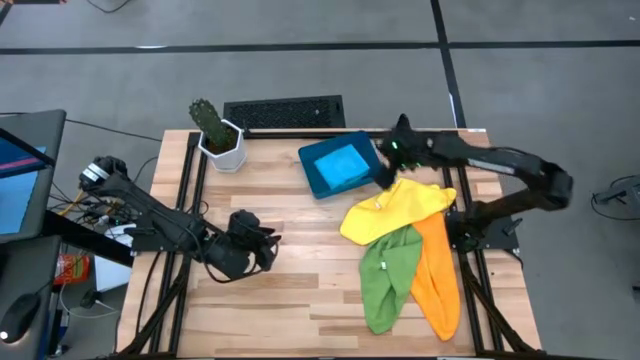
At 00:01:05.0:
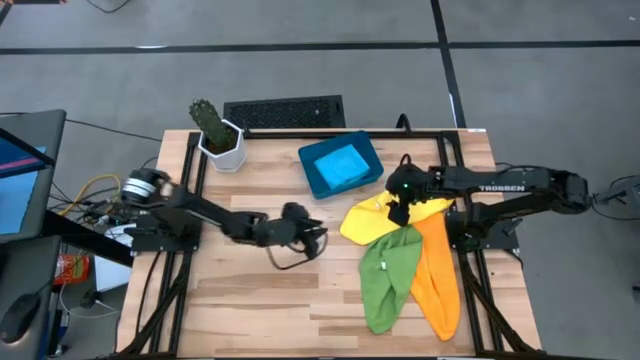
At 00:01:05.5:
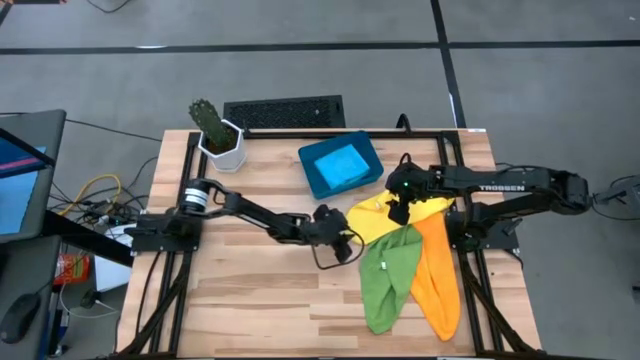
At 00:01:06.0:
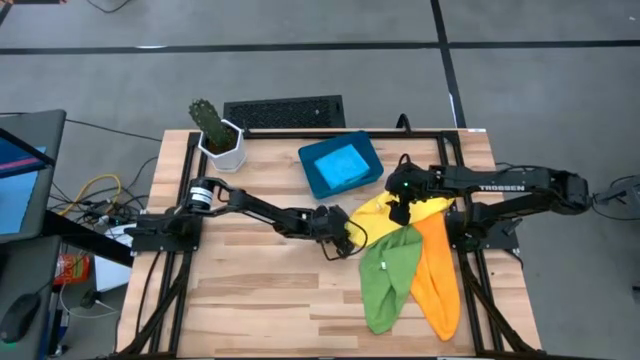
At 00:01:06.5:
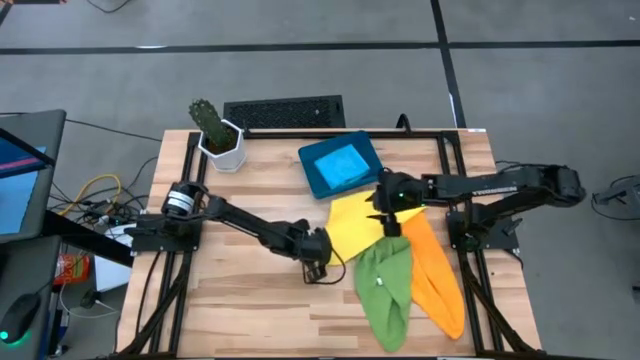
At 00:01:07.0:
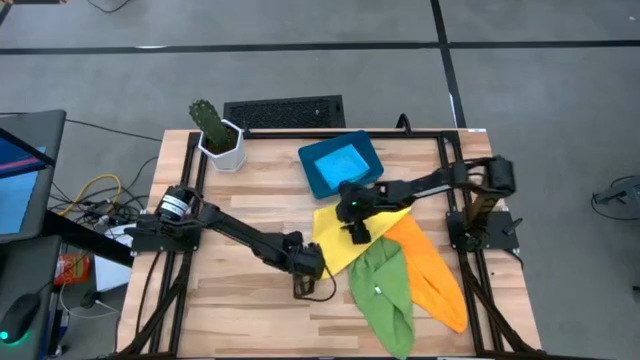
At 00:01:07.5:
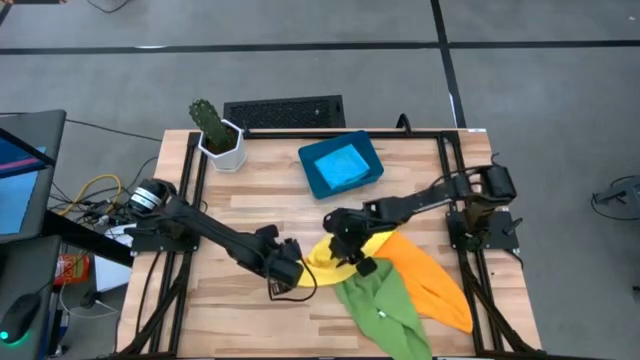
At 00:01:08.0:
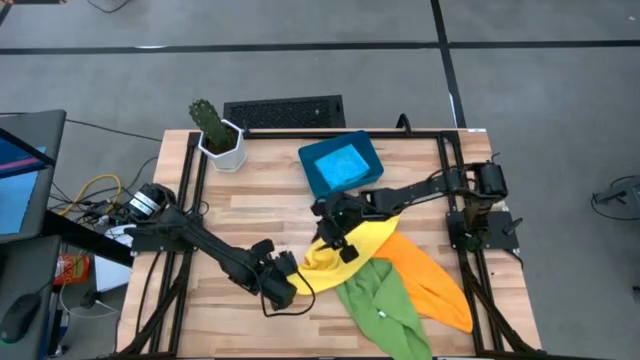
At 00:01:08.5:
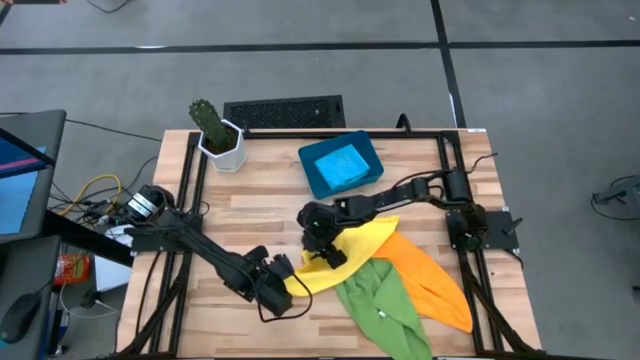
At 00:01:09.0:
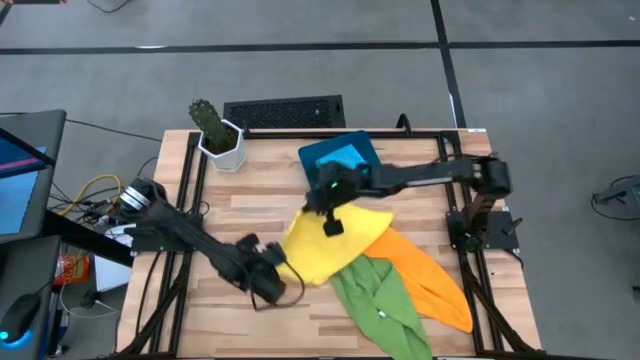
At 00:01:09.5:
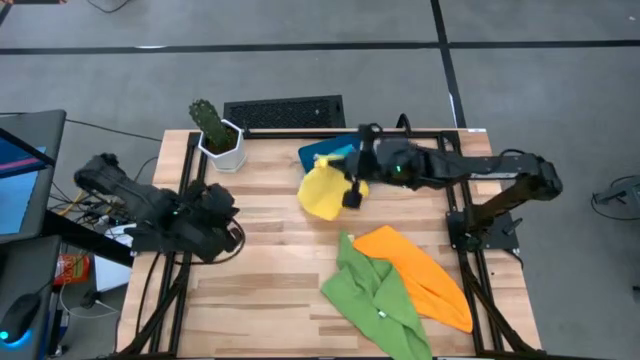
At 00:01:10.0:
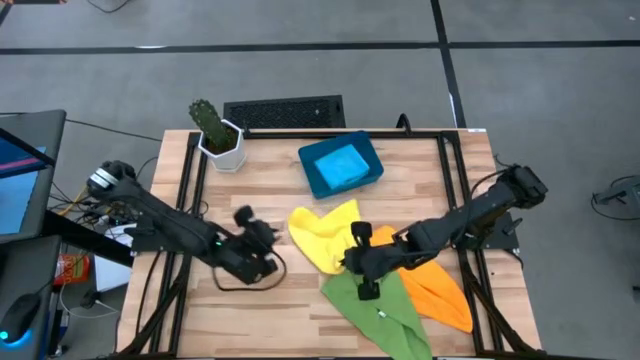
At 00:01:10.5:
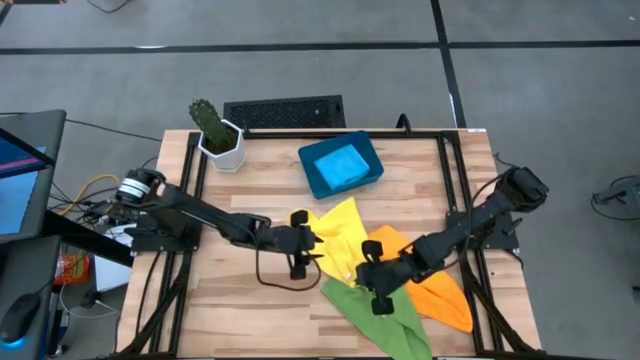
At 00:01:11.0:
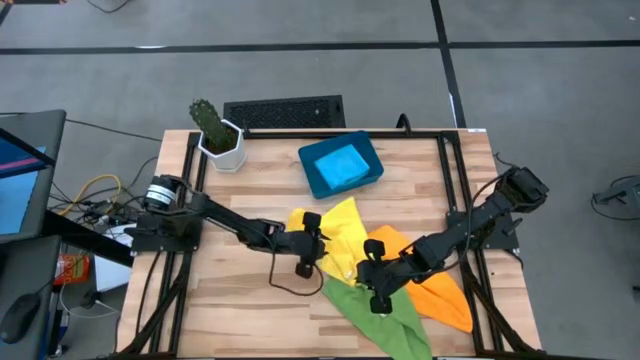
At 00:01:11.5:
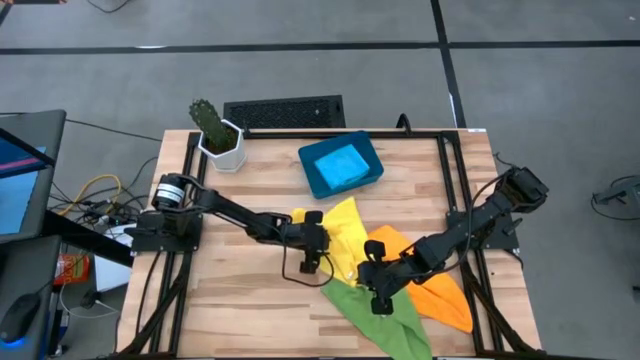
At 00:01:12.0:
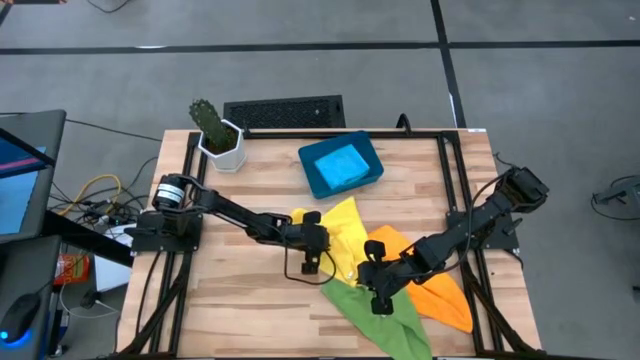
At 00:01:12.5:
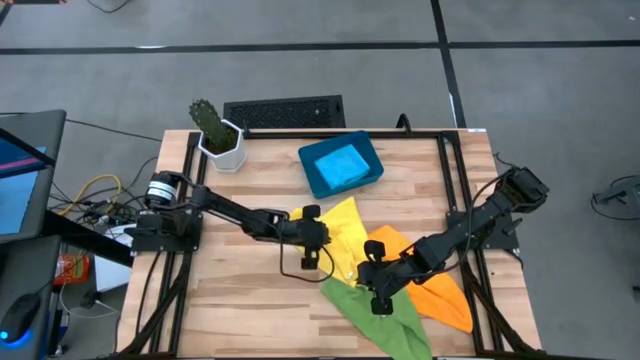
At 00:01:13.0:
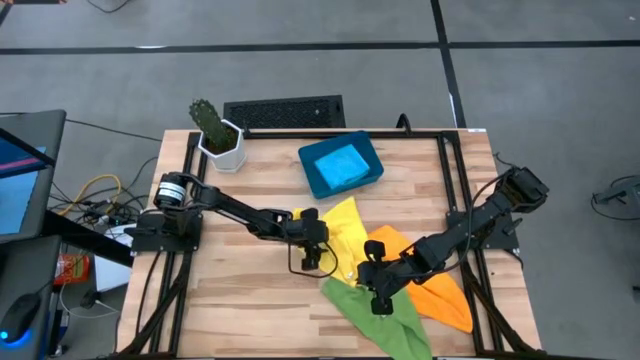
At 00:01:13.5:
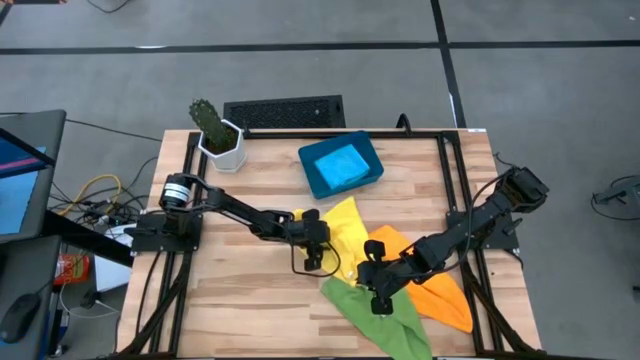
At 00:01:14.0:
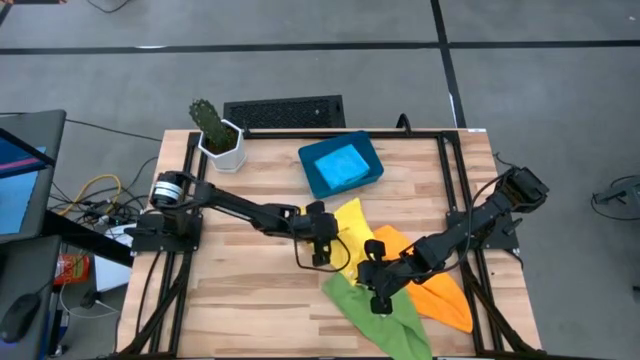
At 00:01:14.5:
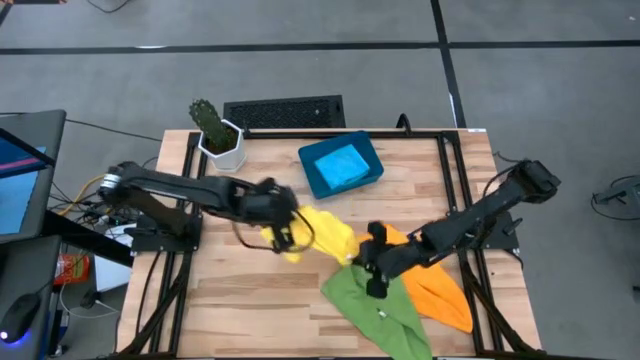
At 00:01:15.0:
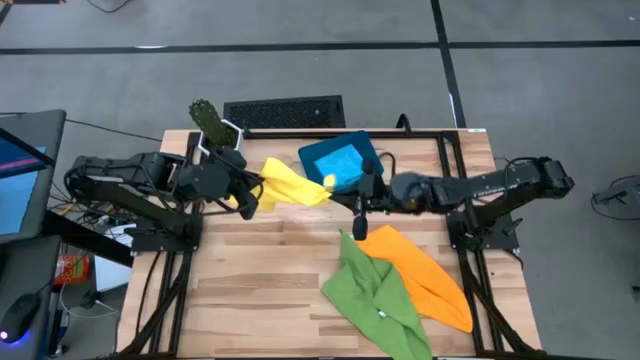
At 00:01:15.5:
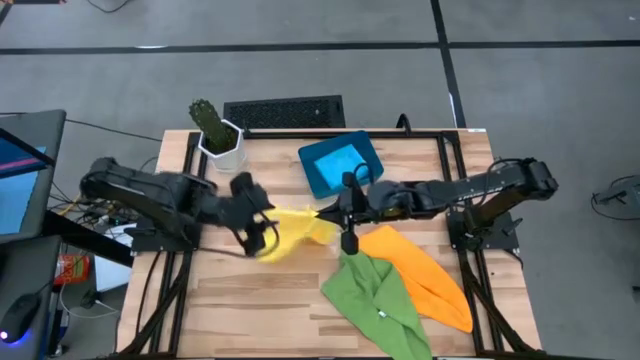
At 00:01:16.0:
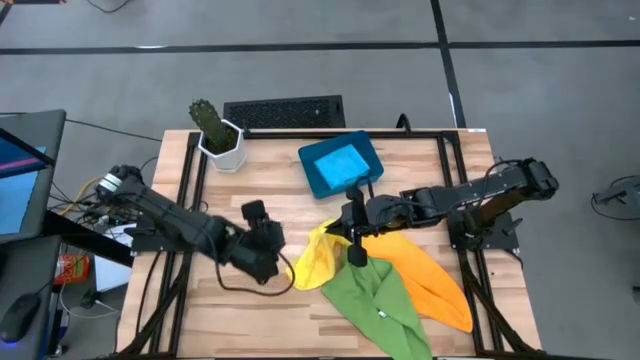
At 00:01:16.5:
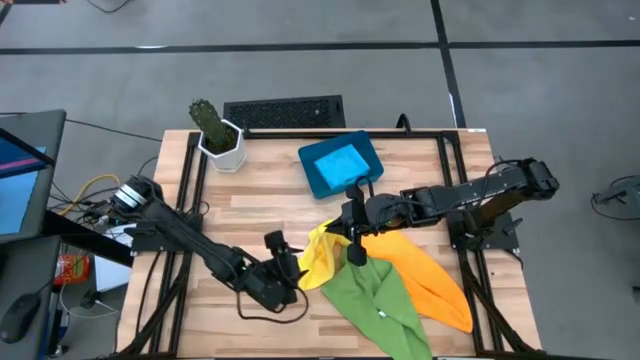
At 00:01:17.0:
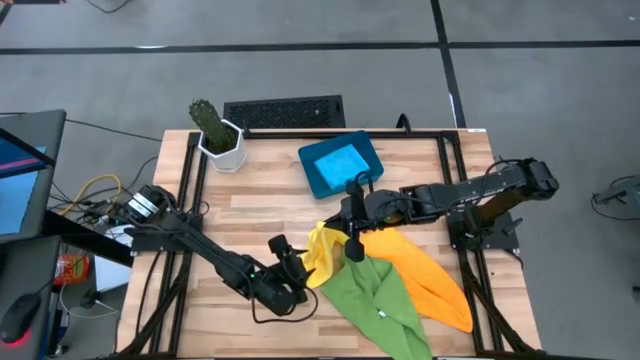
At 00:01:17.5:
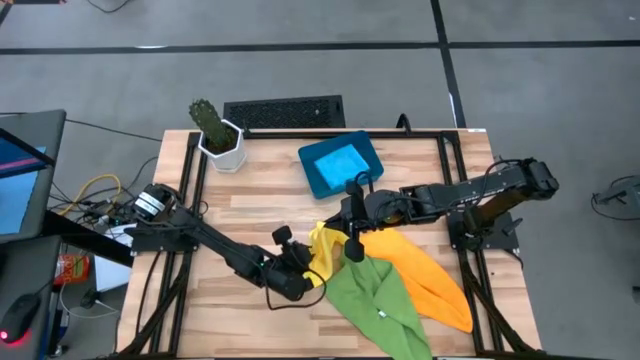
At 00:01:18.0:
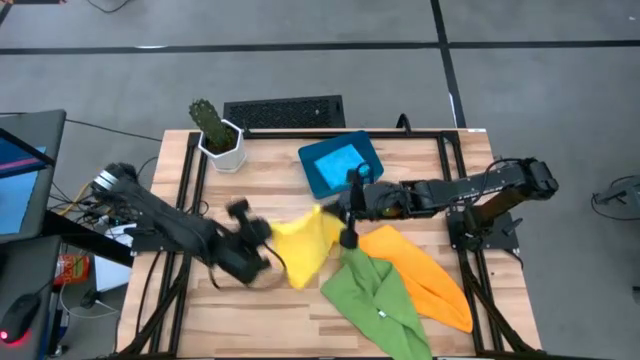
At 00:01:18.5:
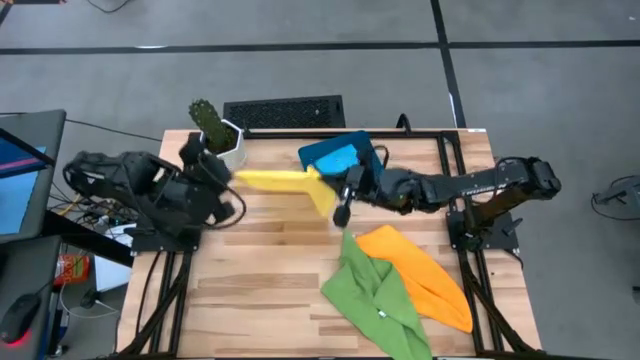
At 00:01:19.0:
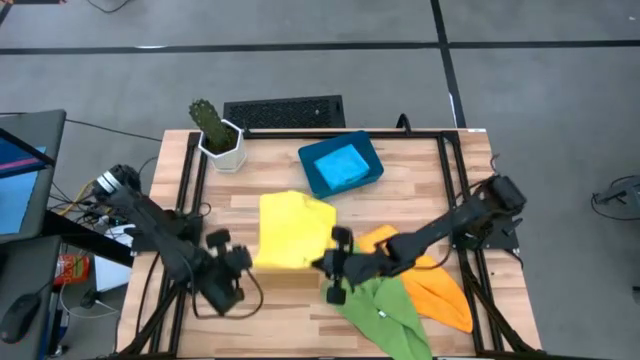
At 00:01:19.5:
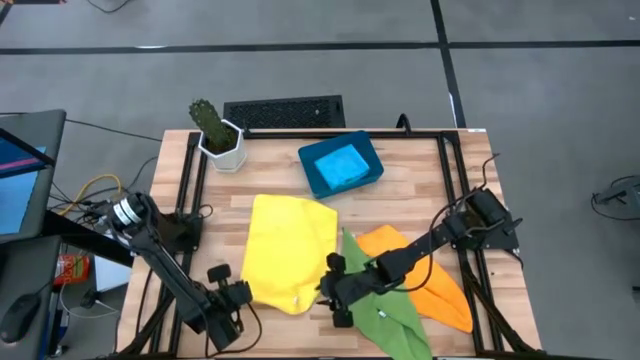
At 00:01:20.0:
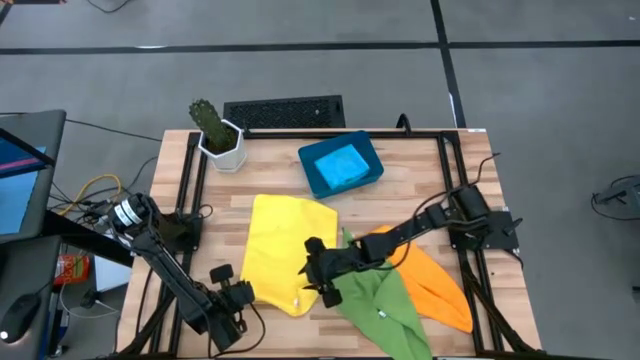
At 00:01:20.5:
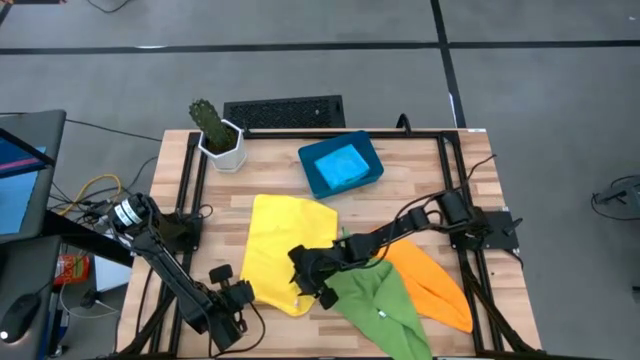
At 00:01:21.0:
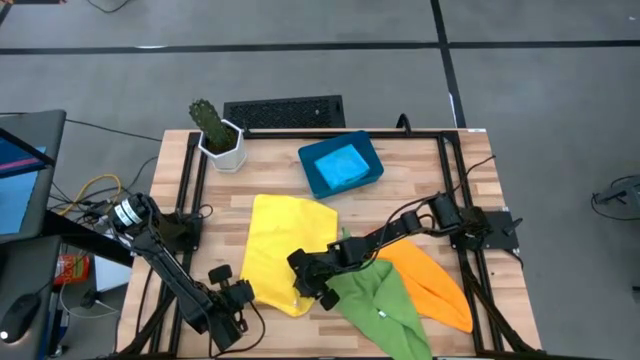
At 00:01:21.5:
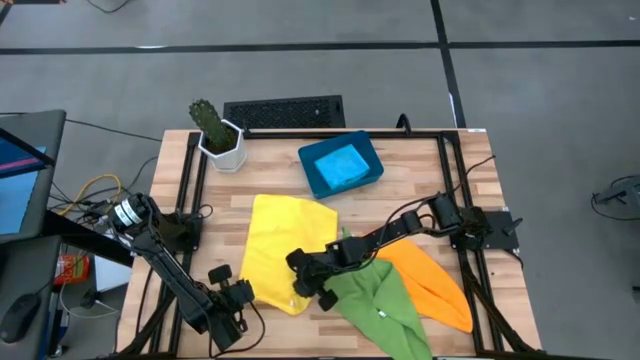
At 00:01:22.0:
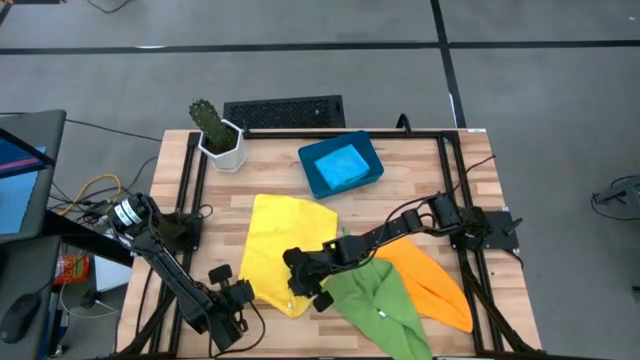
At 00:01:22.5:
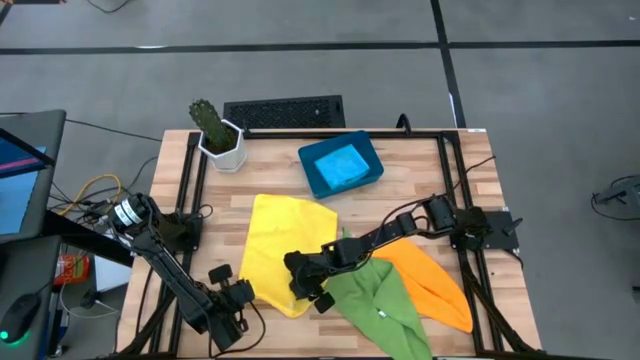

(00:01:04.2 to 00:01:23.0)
Task: Fold microfiber towels
Fold the yellow microfiber cloth

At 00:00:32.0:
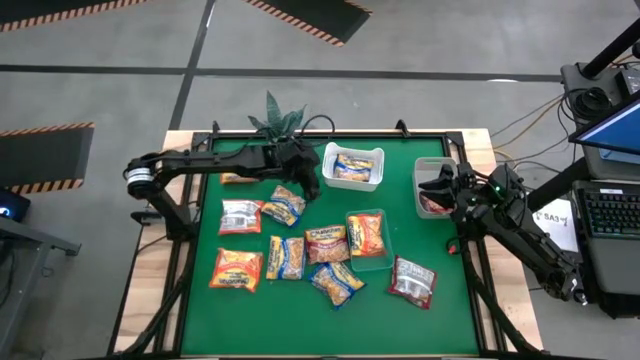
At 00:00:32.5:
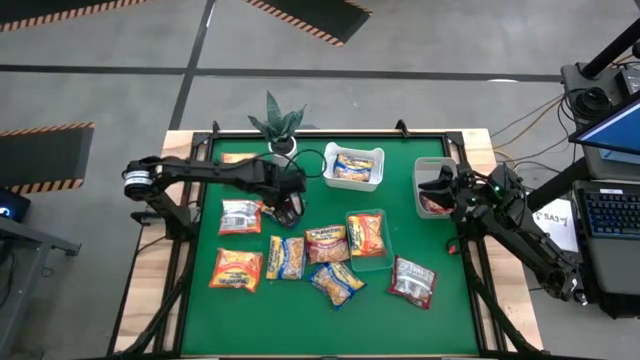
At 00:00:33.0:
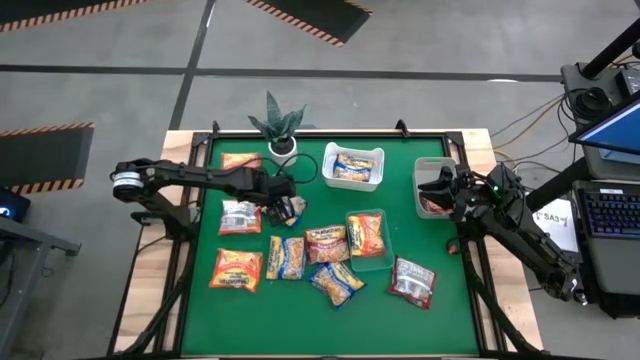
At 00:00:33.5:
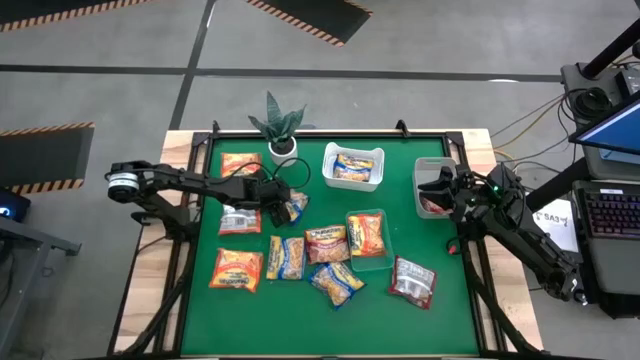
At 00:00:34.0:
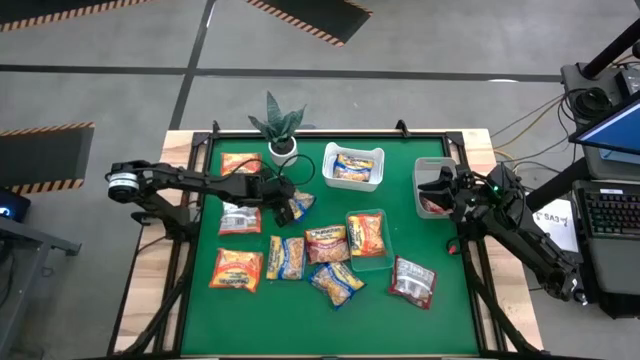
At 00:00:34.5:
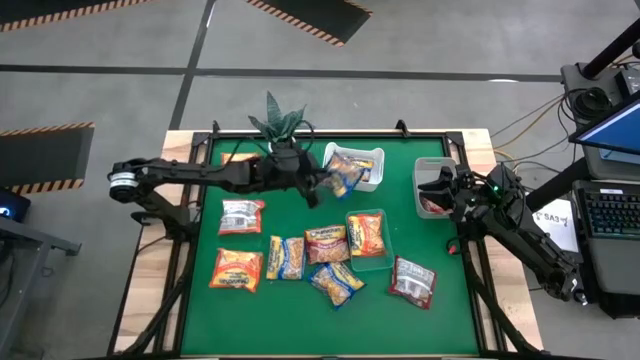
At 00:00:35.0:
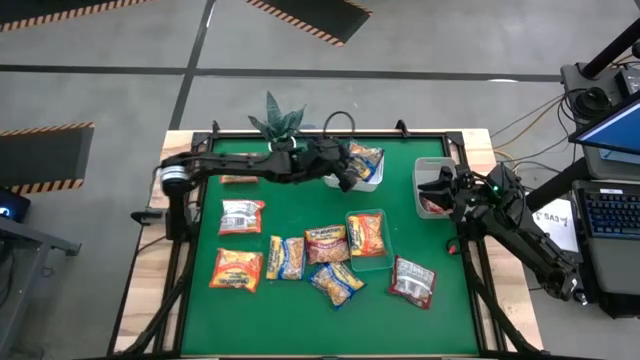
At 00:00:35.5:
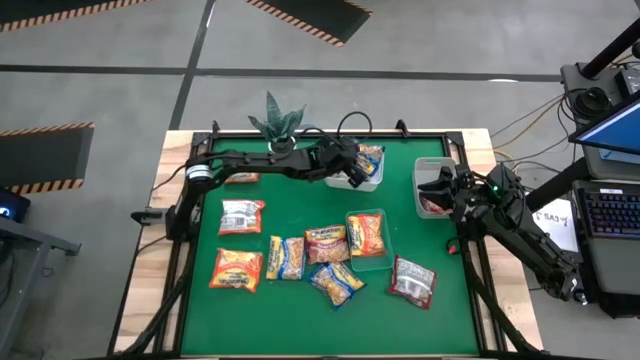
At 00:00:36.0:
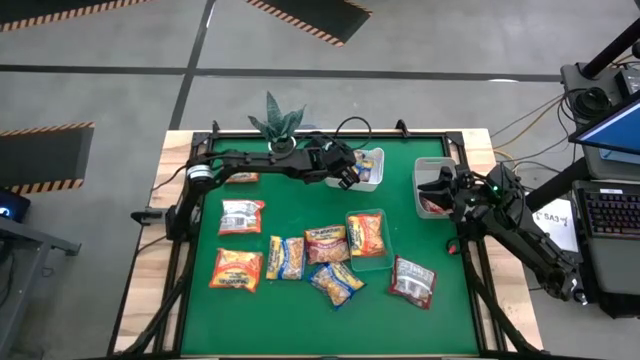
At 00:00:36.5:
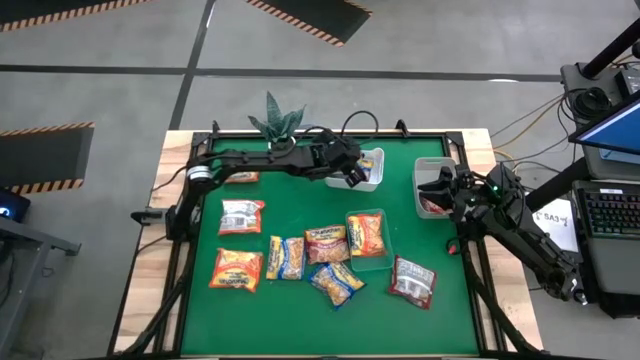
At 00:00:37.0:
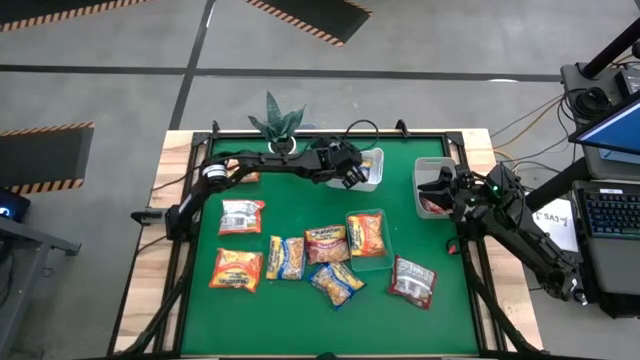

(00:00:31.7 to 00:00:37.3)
Task: Sort Maruchan noodles
Put the blue noodle pack into the white bin
